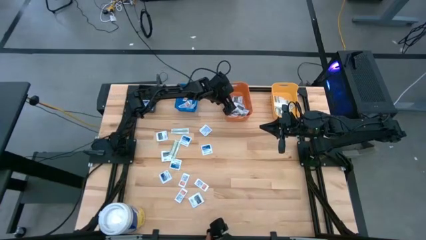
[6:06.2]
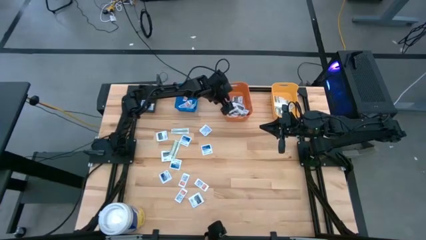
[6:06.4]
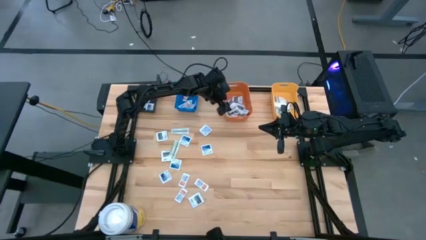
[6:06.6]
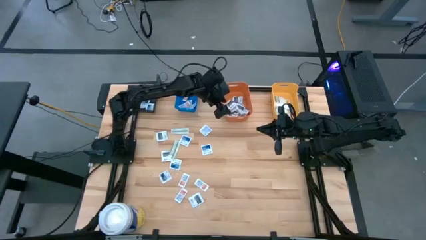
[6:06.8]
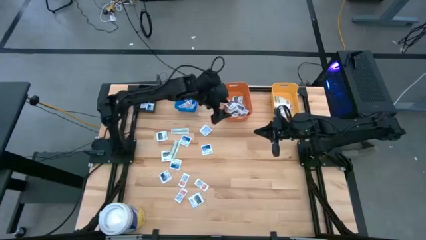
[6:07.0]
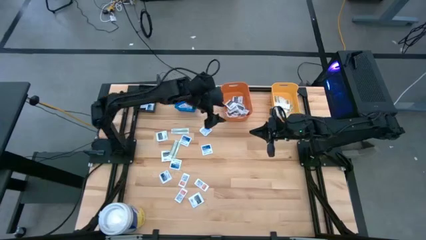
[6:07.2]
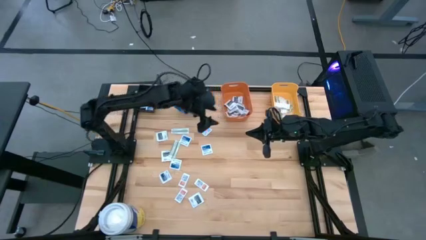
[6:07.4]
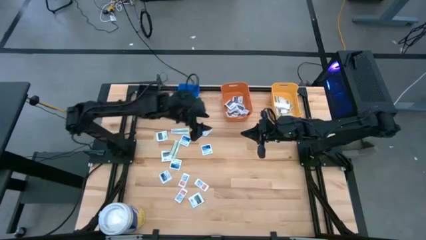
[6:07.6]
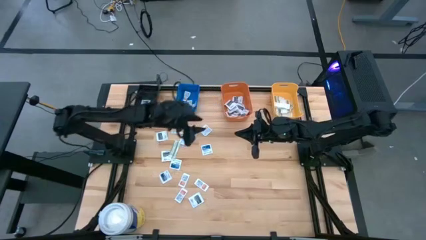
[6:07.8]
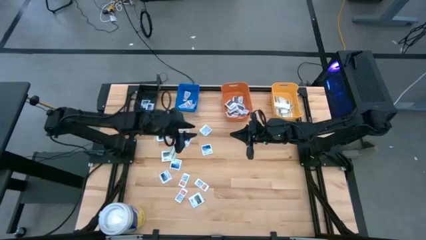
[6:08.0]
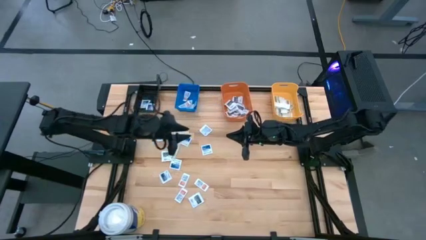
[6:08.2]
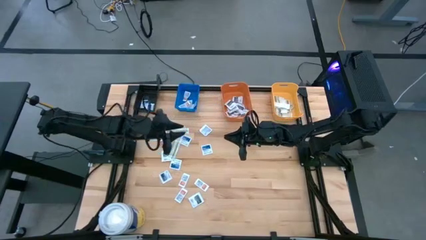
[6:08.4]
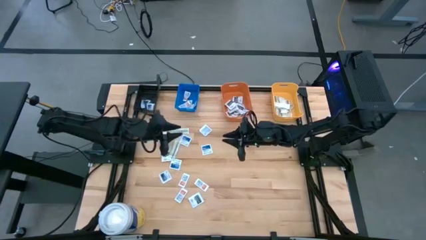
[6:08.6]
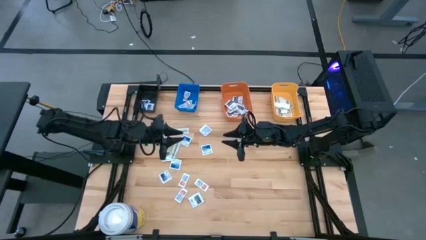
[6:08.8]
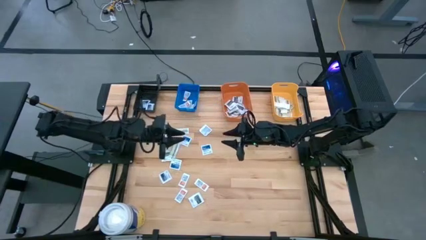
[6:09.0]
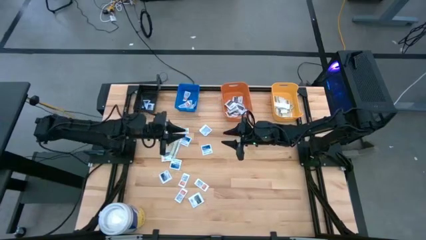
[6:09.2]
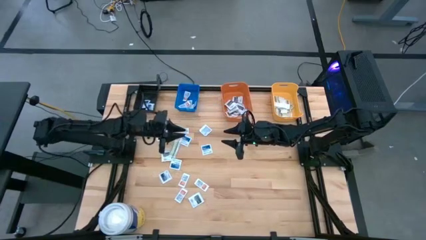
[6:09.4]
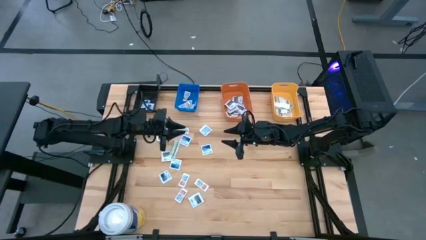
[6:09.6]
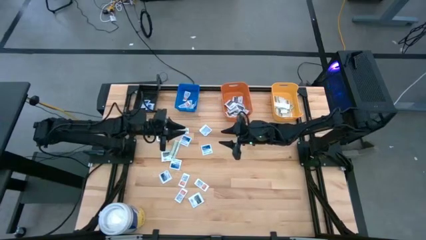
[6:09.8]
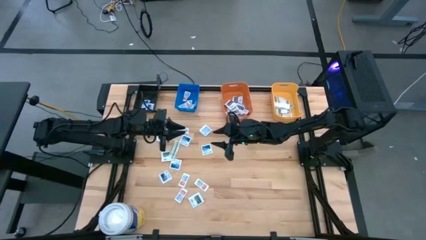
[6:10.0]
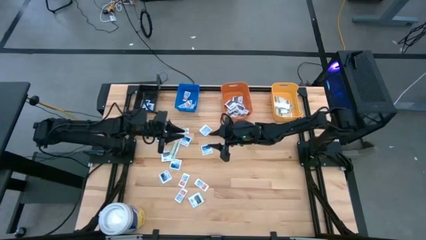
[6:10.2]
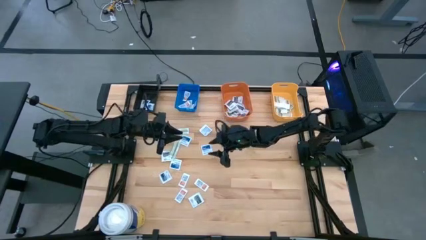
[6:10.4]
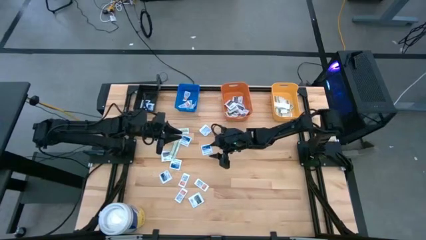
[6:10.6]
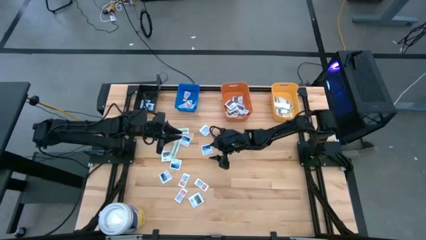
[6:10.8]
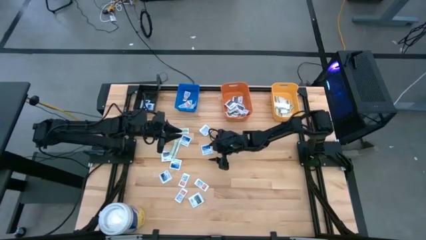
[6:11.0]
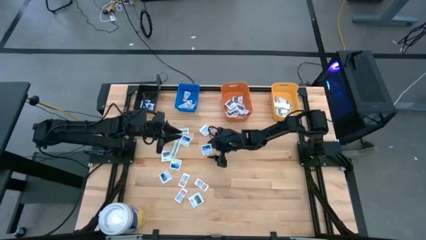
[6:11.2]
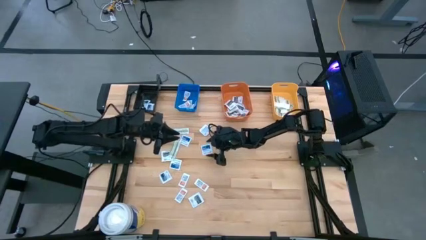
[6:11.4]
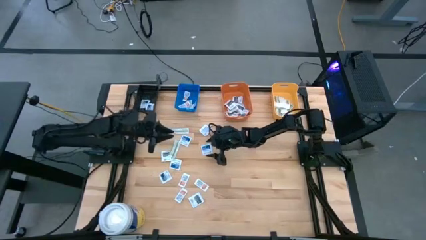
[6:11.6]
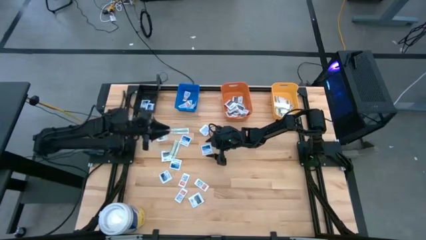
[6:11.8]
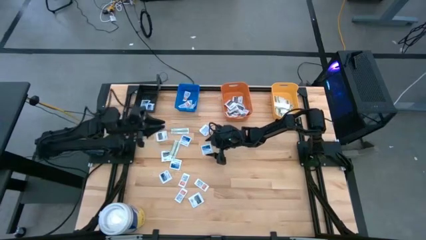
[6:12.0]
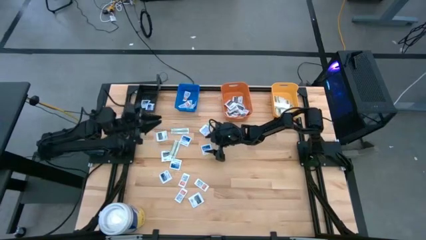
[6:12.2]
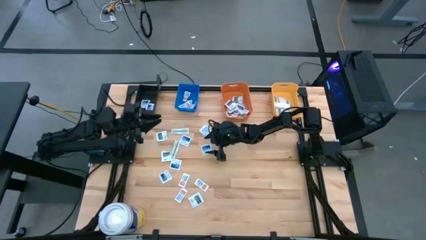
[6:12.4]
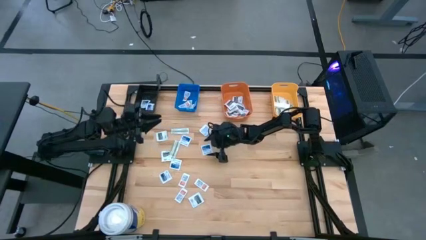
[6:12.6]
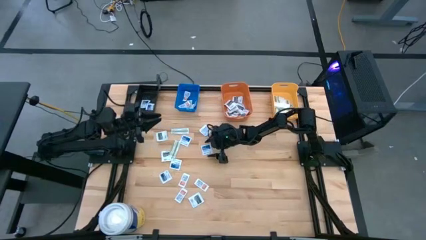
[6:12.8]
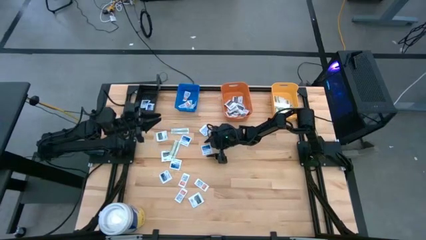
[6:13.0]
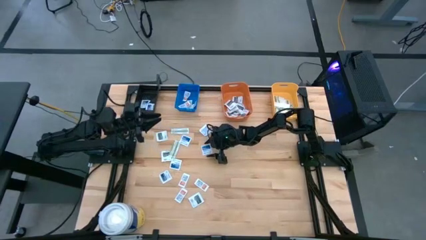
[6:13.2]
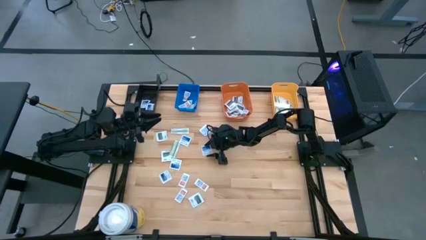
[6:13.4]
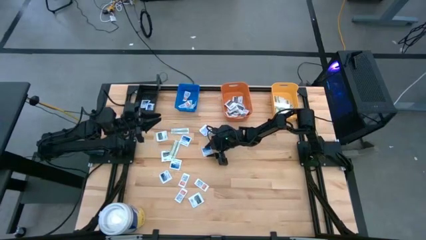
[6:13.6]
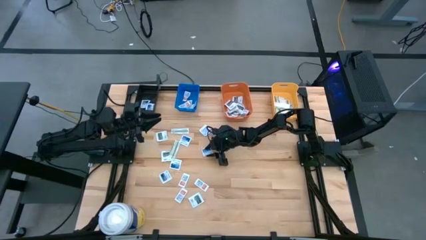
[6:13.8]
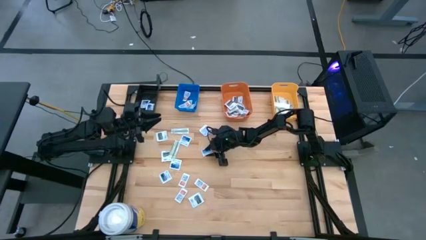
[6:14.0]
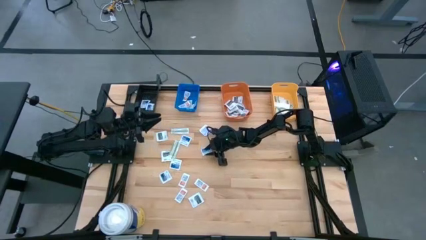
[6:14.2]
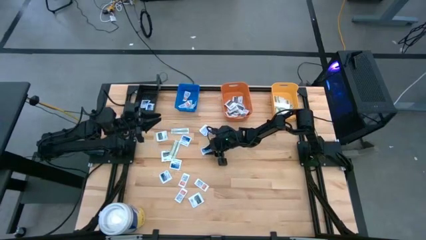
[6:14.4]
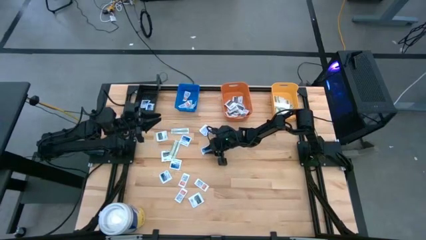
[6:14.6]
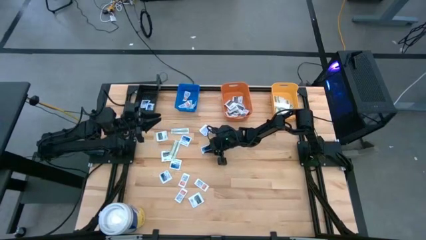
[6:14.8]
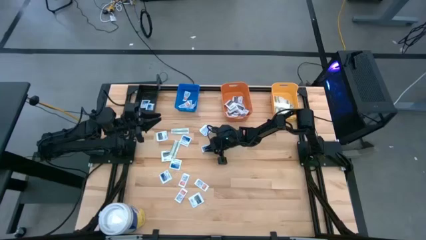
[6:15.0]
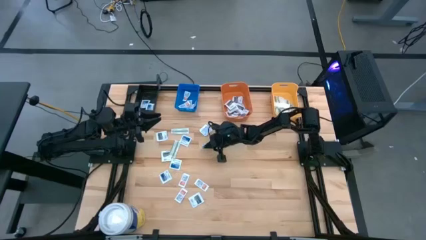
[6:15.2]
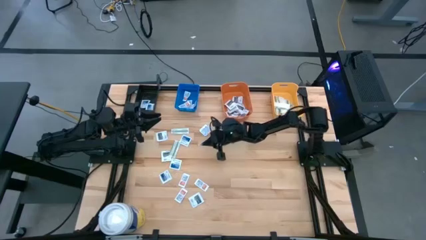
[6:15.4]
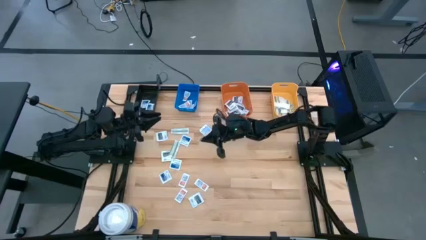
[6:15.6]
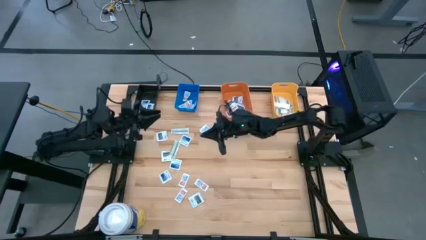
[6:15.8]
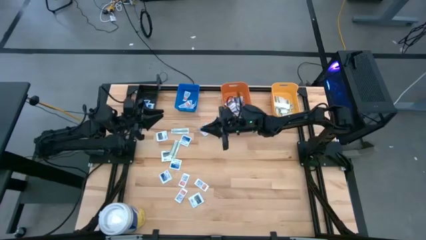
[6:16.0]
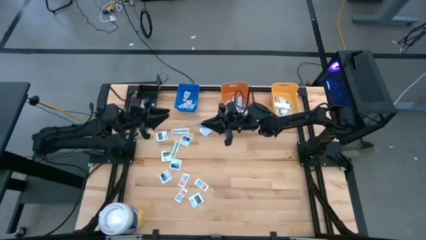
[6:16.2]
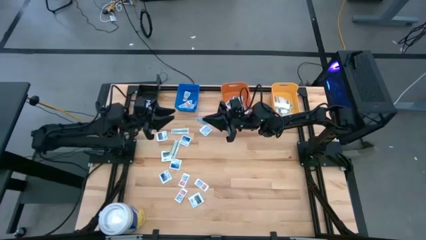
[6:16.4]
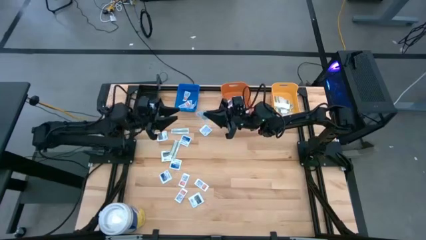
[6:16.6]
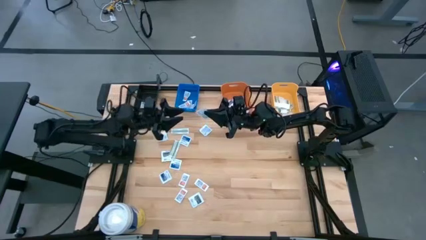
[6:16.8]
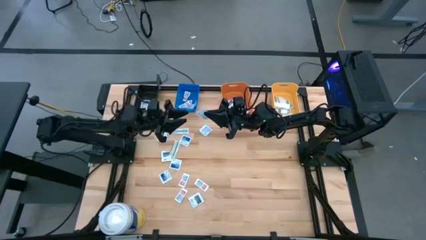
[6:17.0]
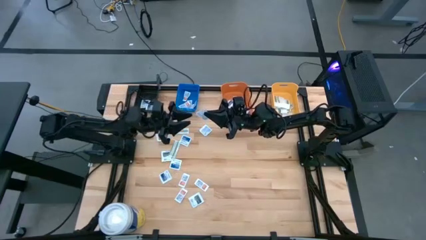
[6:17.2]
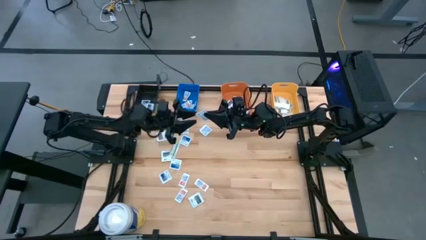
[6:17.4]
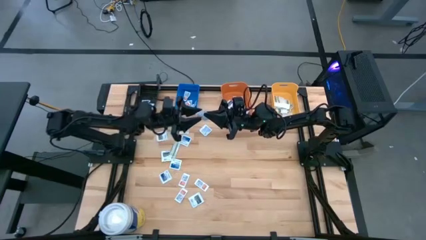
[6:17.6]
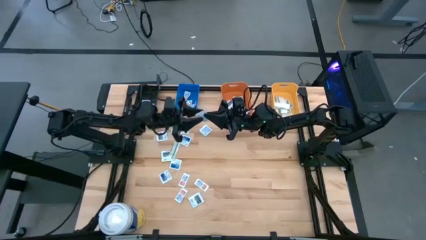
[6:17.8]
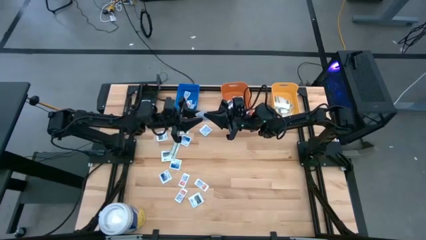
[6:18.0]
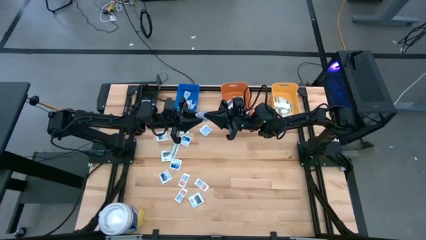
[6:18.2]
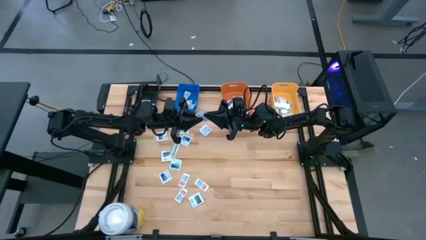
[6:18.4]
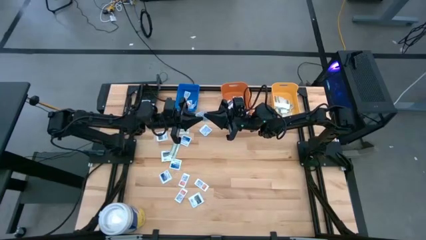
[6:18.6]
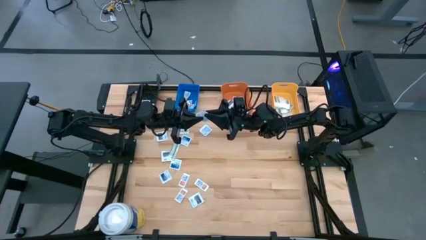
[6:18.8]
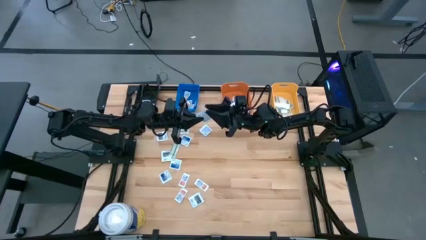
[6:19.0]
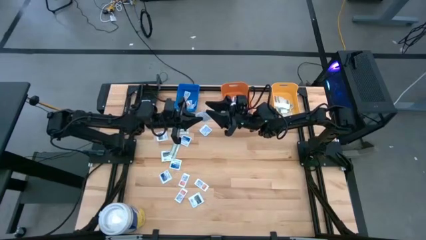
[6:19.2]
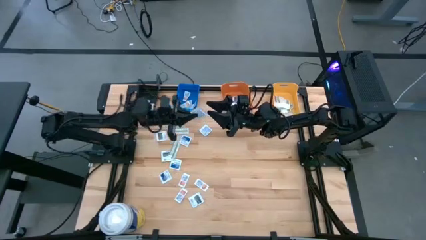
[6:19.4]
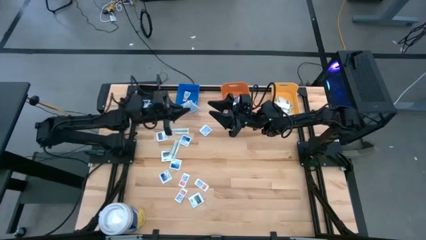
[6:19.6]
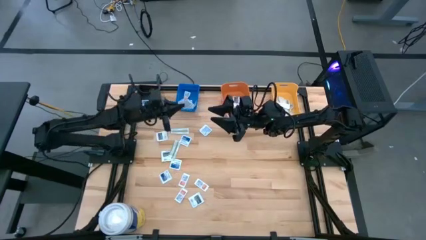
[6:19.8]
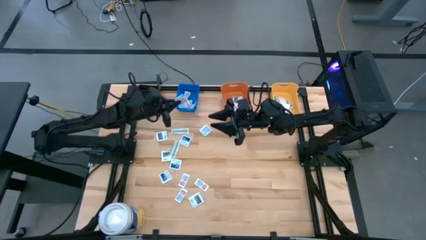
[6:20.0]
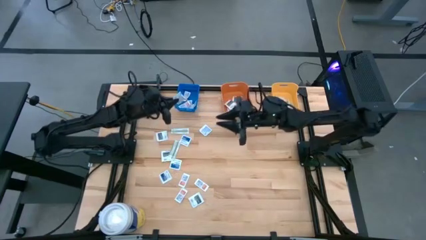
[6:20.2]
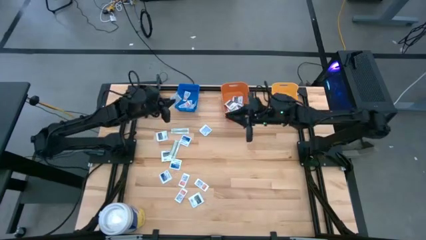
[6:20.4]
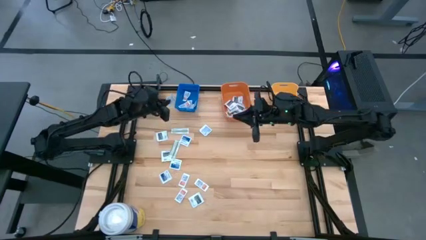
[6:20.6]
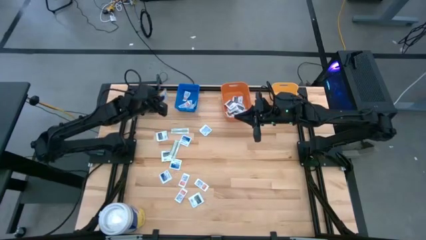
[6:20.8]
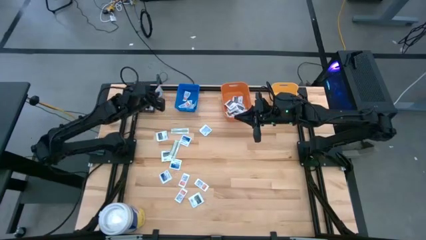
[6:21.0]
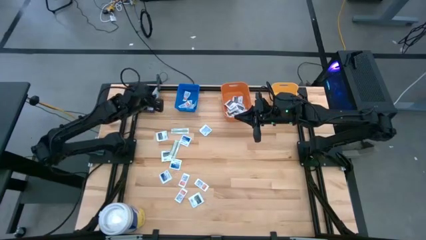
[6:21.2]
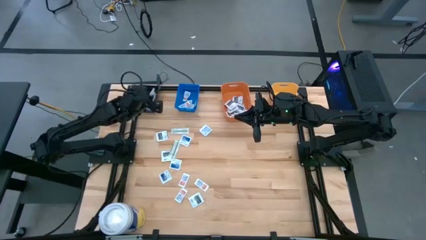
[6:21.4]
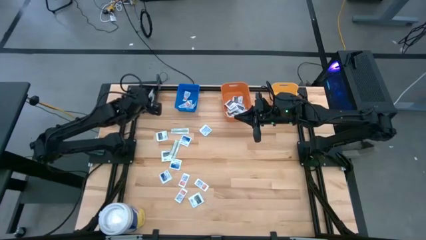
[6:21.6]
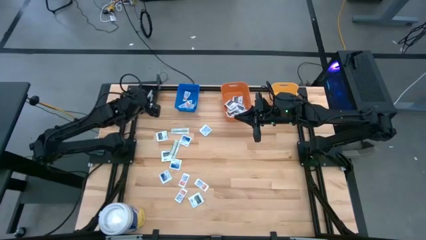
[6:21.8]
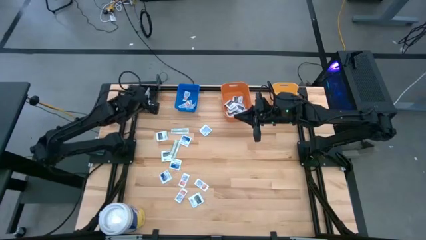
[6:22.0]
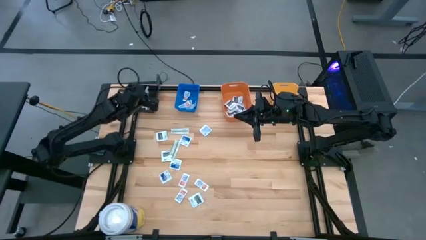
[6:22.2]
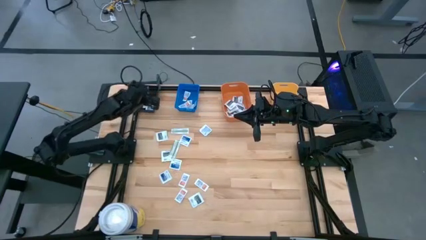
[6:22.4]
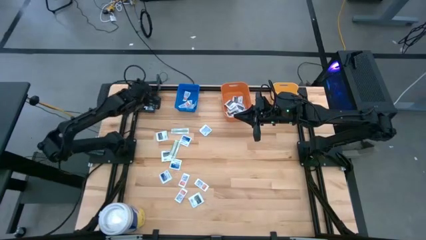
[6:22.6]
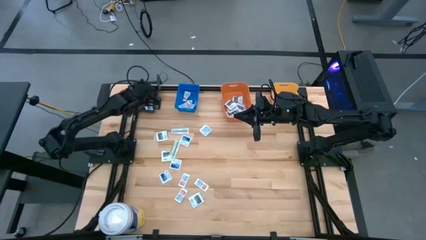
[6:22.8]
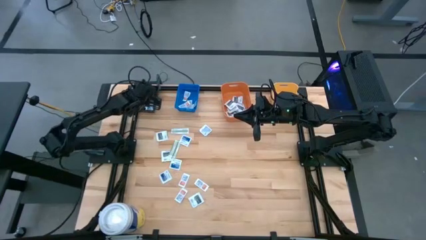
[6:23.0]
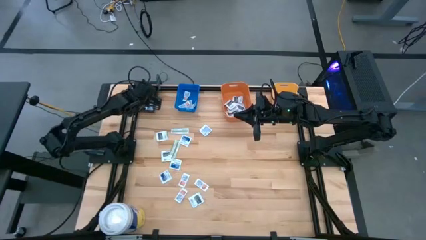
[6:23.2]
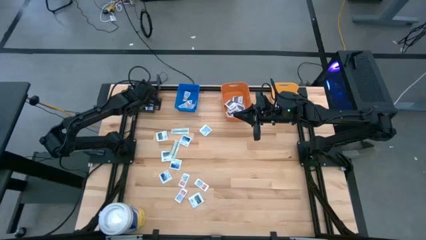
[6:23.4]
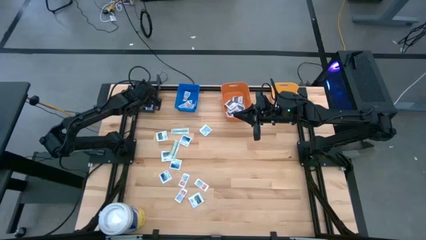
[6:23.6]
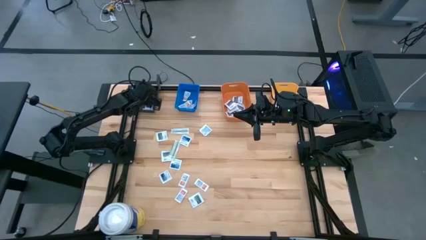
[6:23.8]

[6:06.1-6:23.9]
Task: Pick & Place First Aid Supplies
Put the alcohol pad into the black bin
